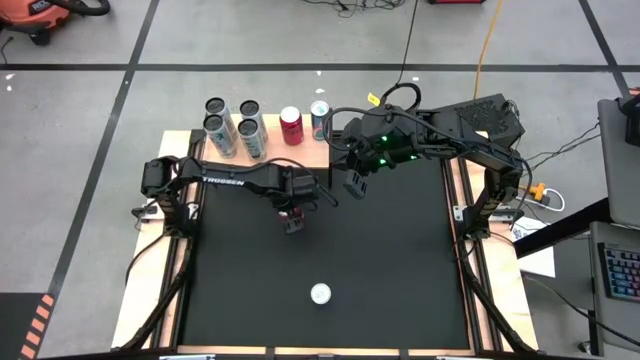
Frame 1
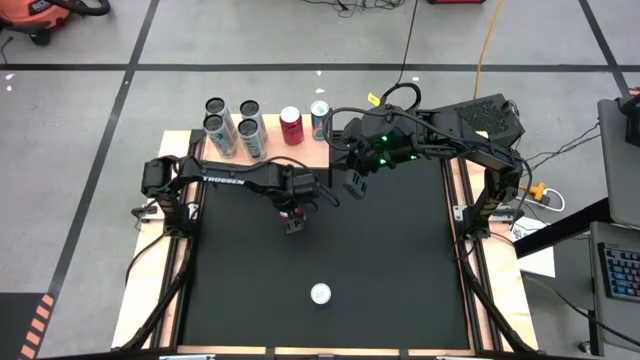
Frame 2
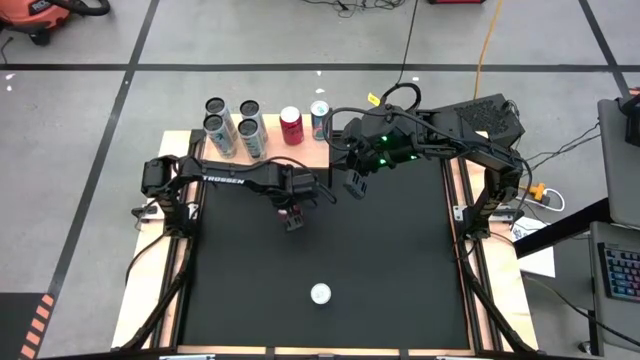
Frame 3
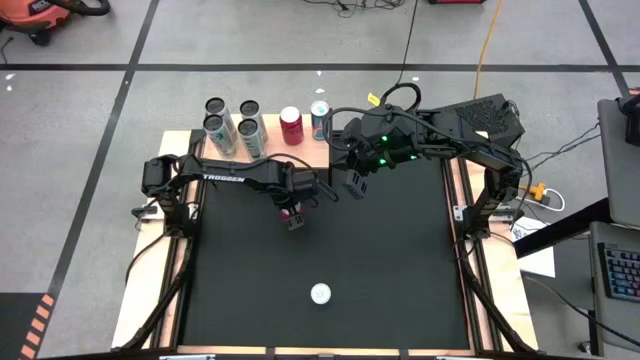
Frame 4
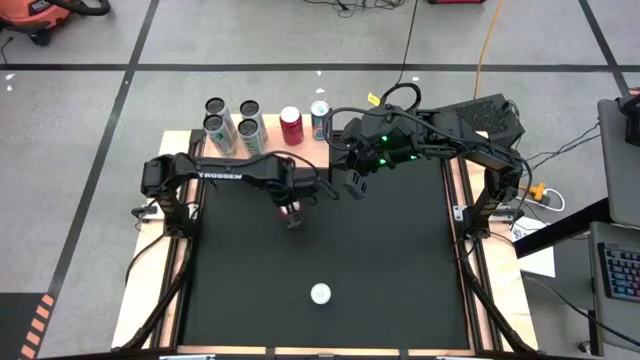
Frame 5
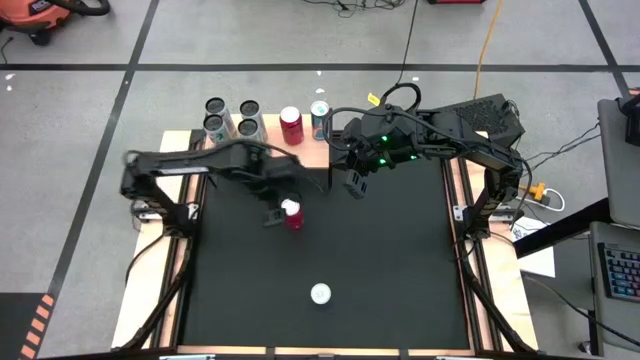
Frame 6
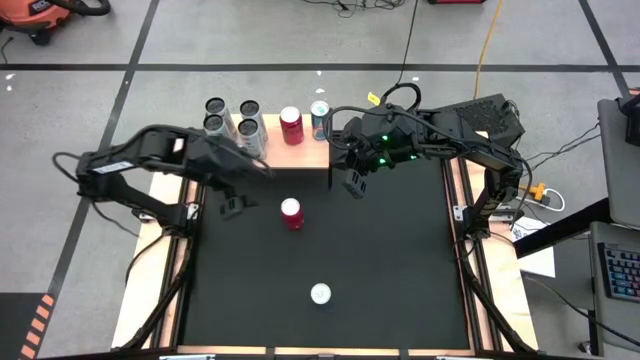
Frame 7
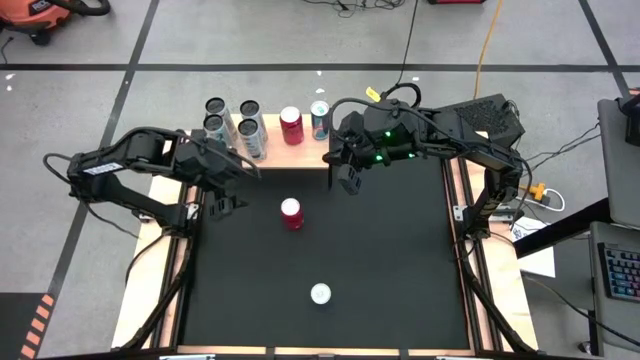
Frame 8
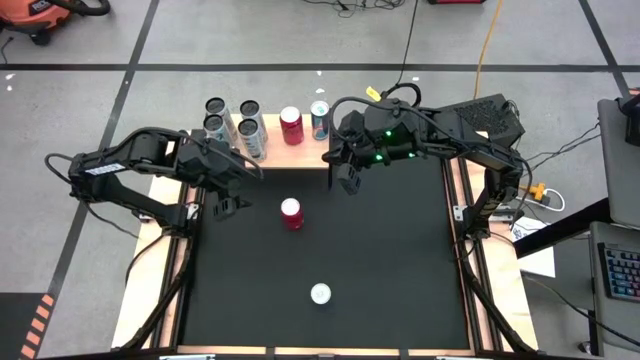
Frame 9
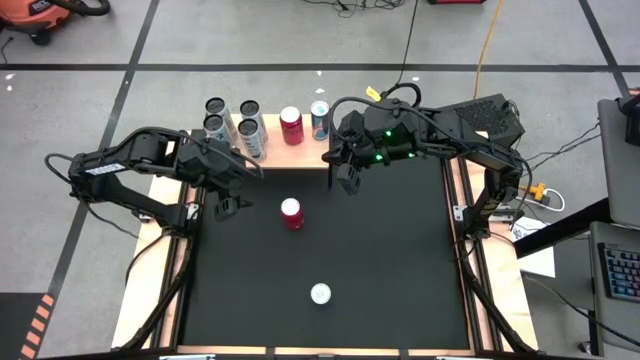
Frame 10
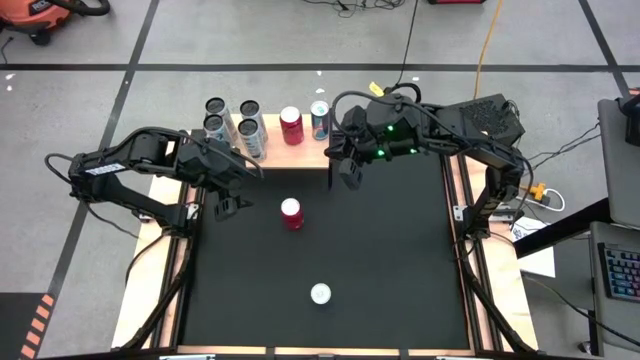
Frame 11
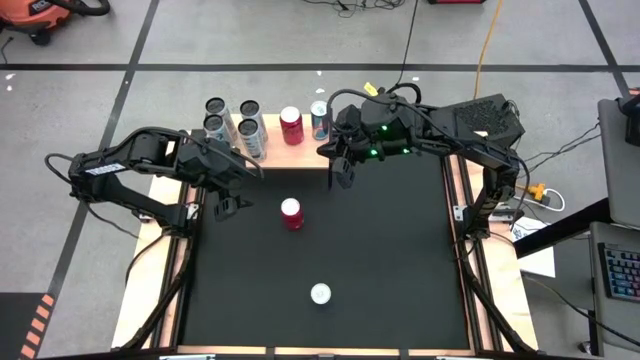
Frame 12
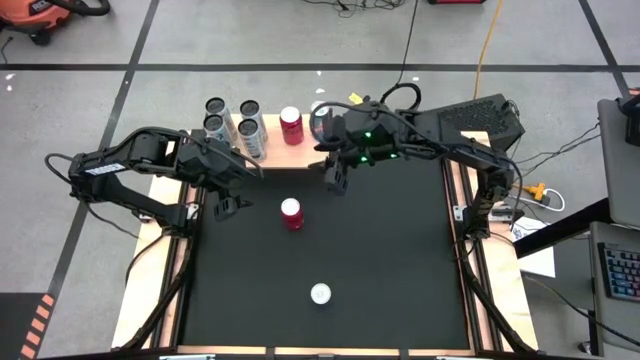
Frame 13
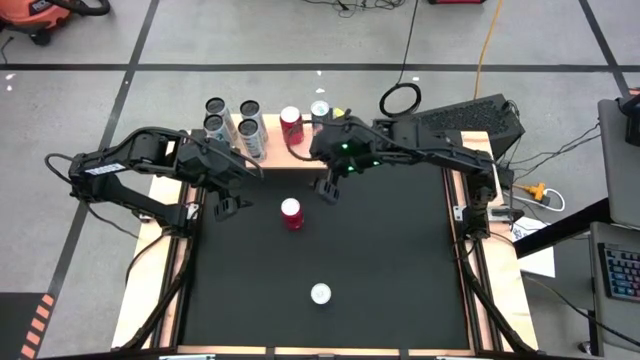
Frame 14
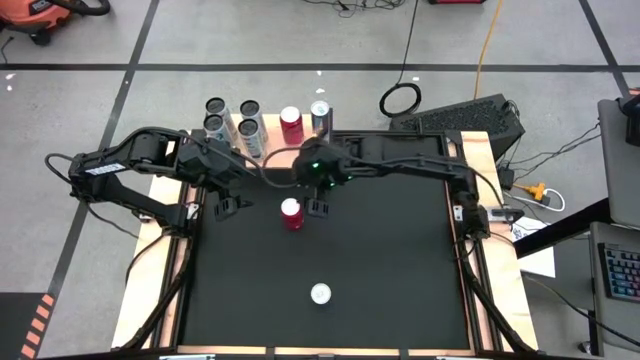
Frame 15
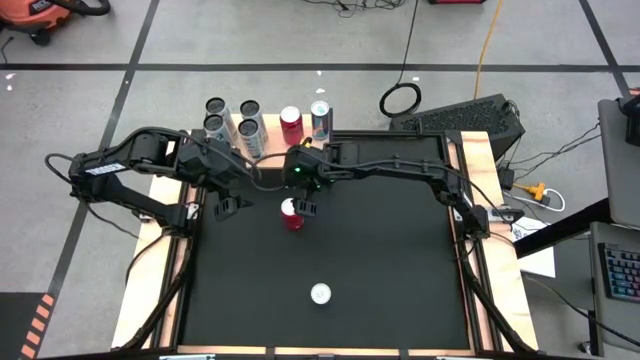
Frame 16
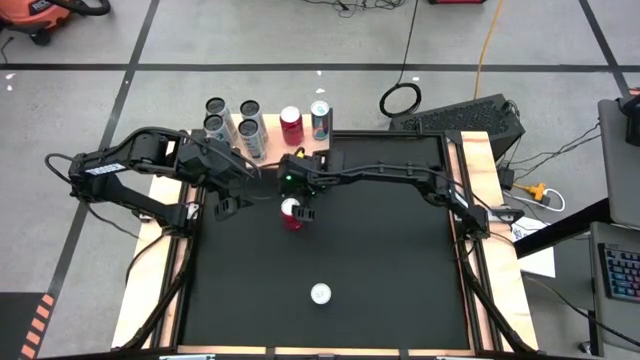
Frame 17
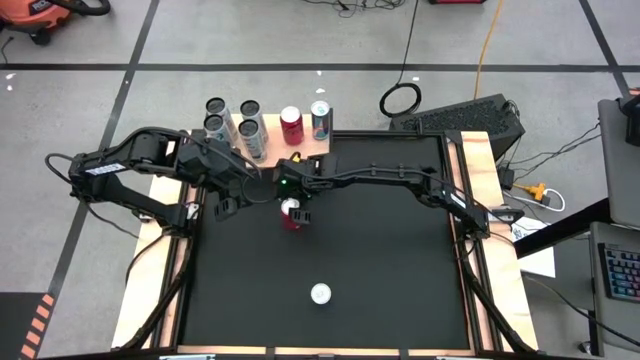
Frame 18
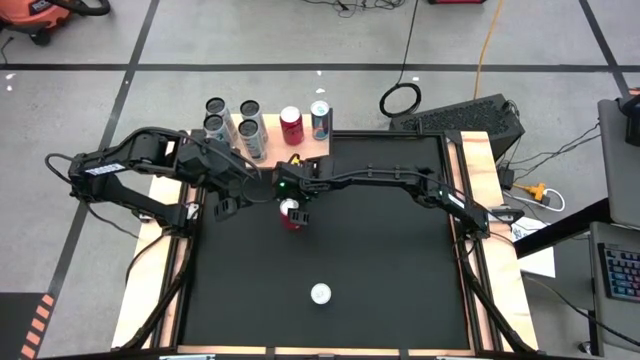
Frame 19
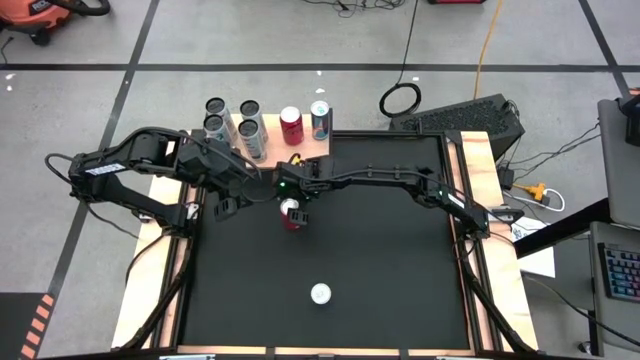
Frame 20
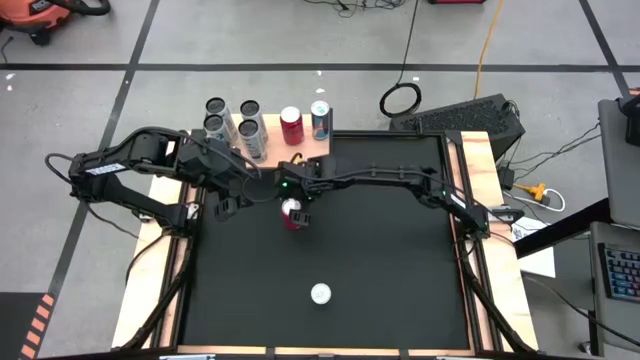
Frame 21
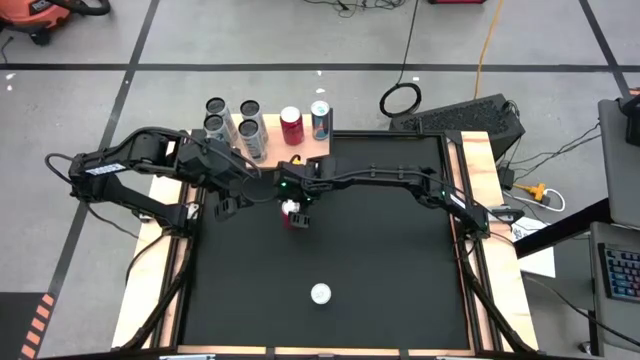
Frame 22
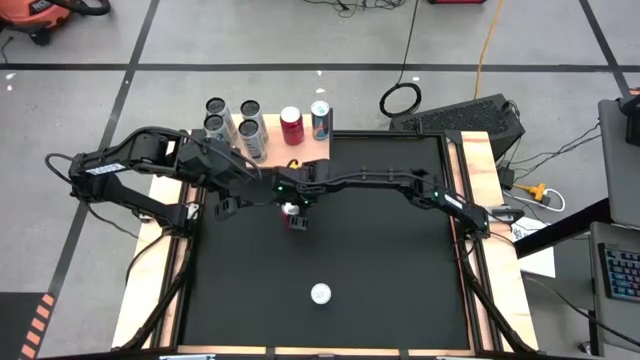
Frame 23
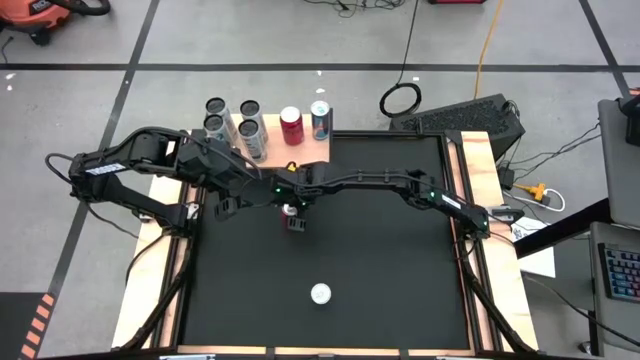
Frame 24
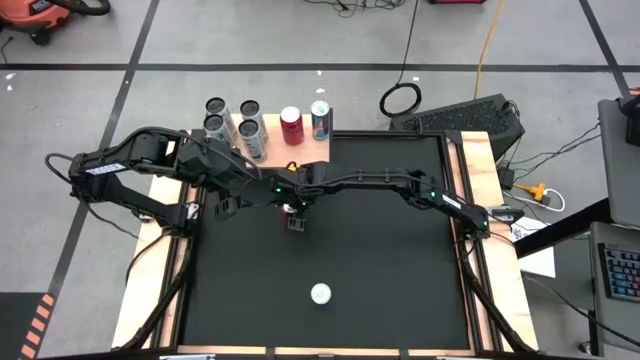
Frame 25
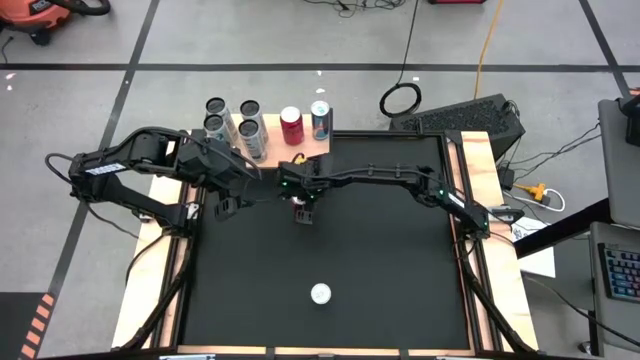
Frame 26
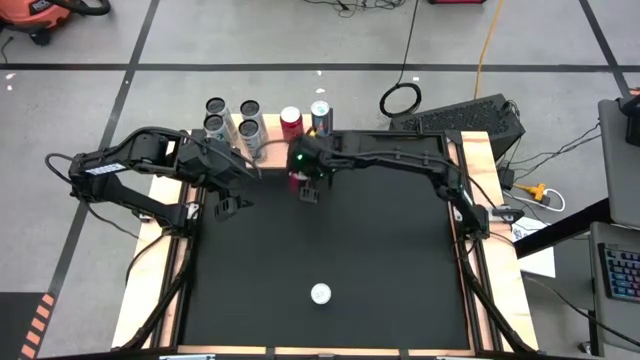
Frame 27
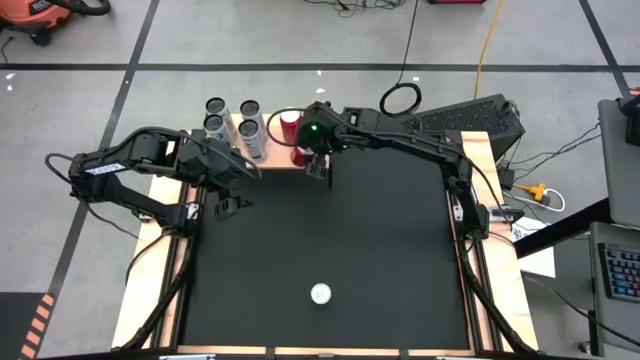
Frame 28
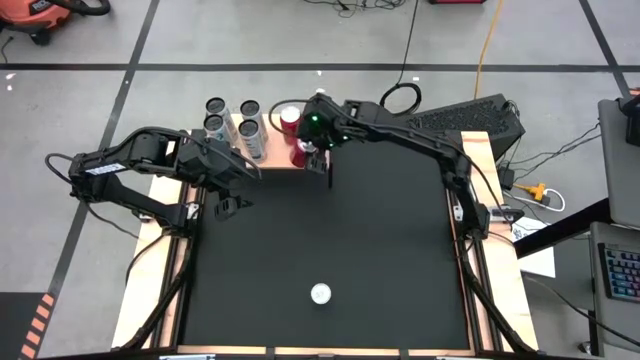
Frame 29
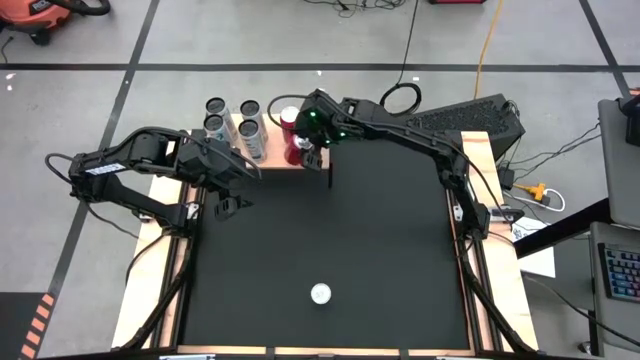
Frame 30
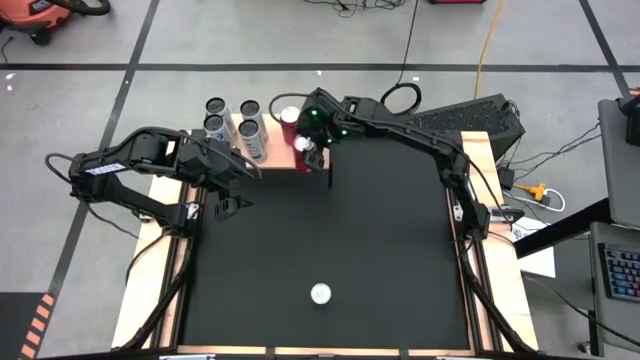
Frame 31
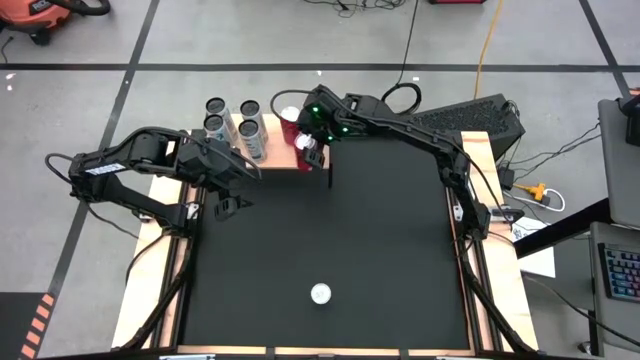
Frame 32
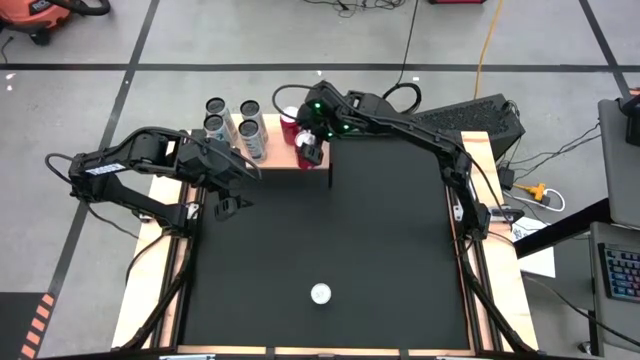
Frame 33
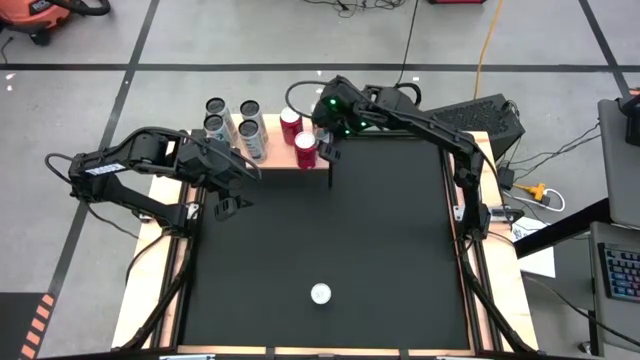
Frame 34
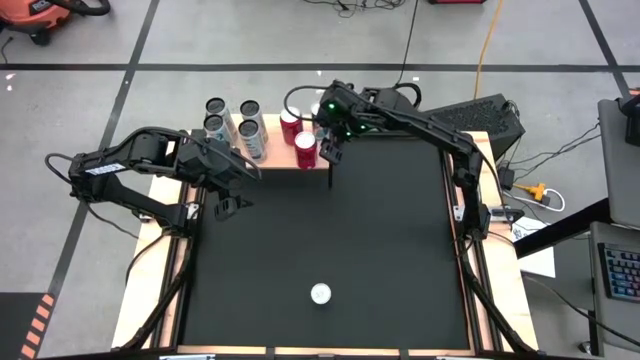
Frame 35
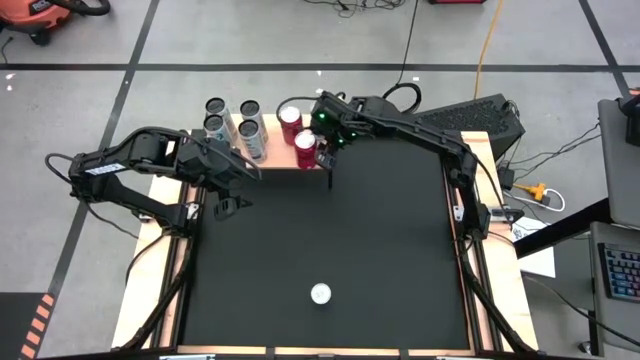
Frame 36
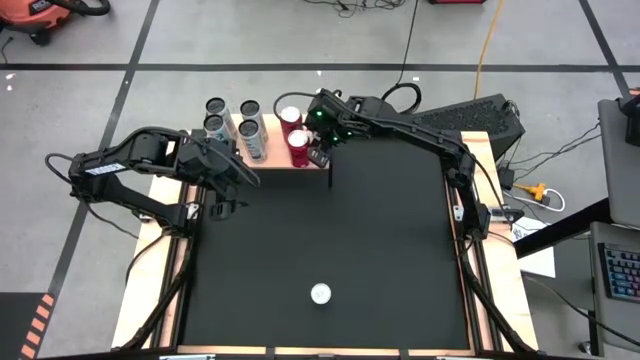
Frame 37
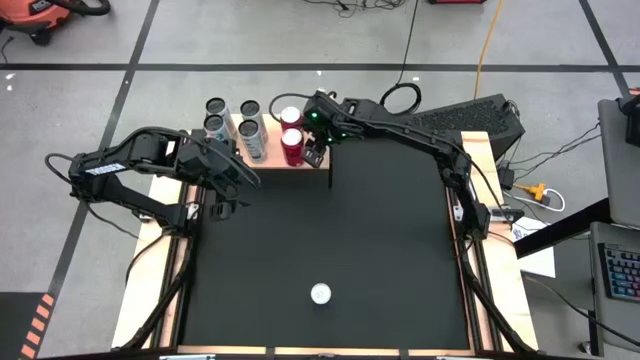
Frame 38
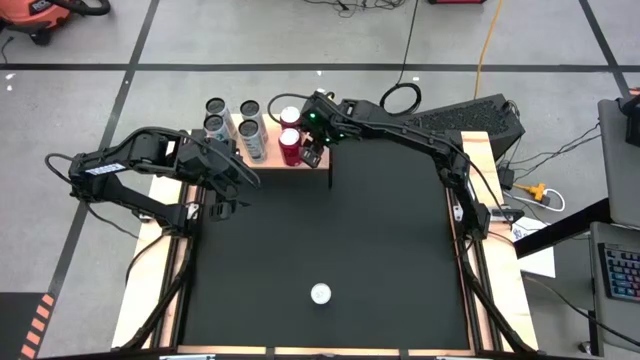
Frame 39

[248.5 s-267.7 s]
Task: Place canned beverage on shelf
Put the red black soda can aligned with the red black soda can on the shelf

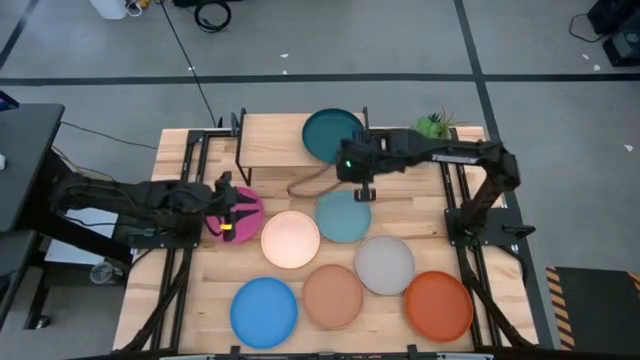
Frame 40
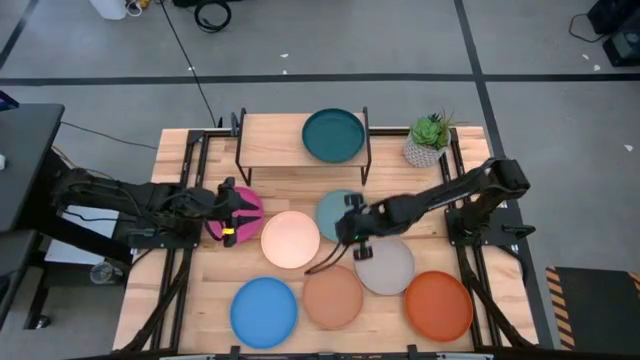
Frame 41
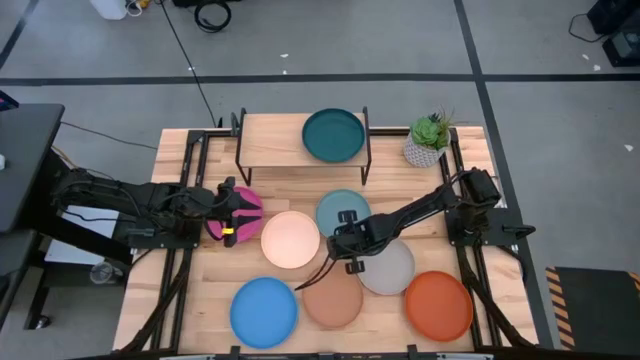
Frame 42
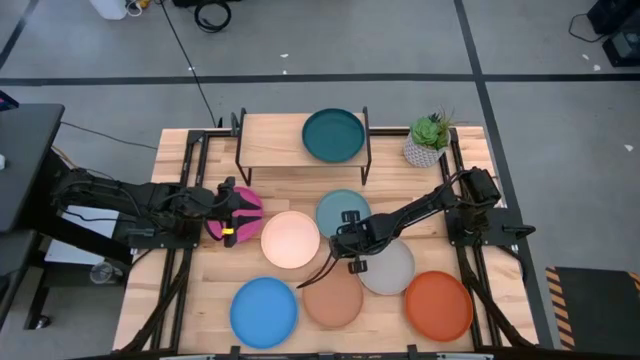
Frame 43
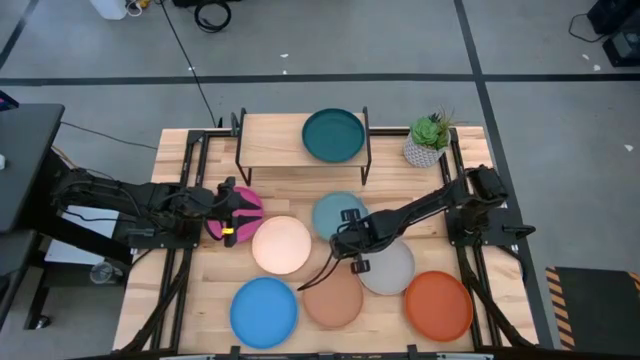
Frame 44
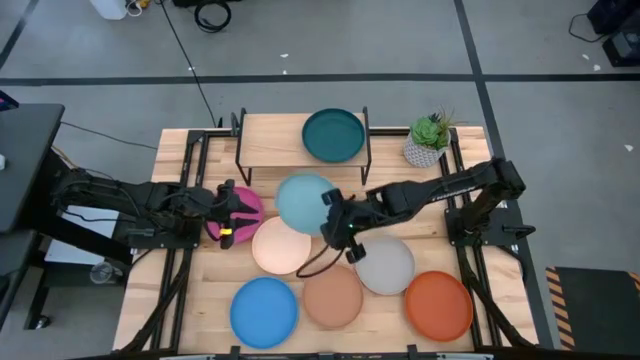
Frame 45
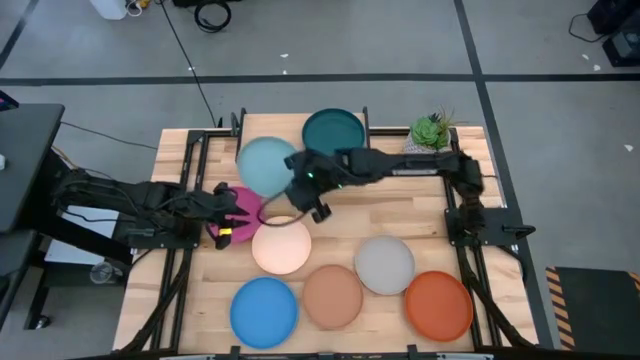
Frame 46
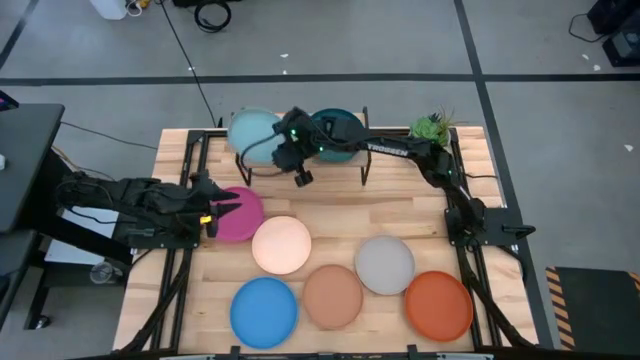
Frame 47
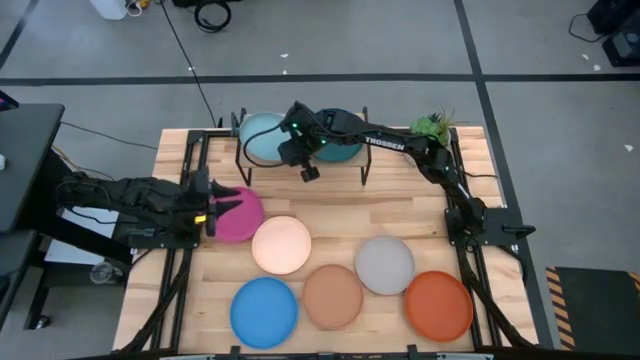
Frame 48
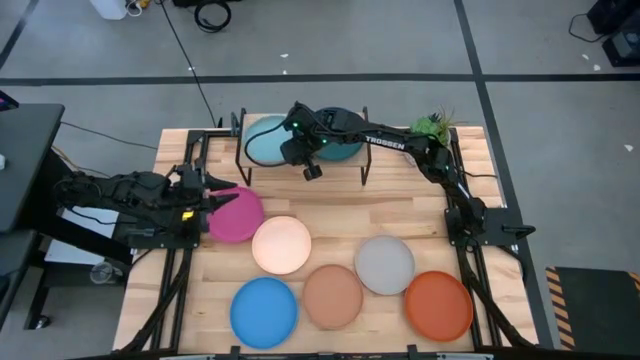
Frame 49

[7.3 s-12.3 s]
Task: Place and stack plates onto a shelf
Put the light blue plate on the shelf
